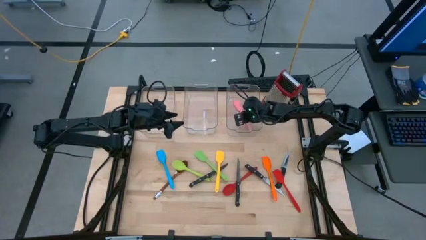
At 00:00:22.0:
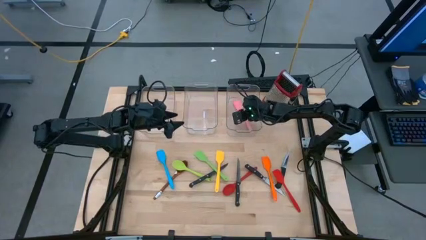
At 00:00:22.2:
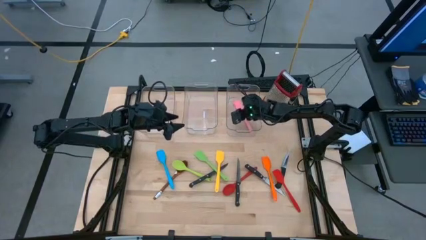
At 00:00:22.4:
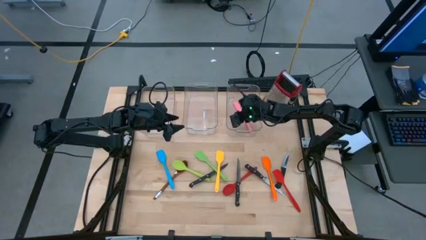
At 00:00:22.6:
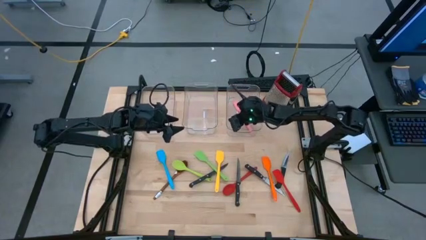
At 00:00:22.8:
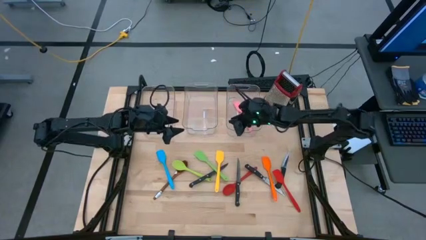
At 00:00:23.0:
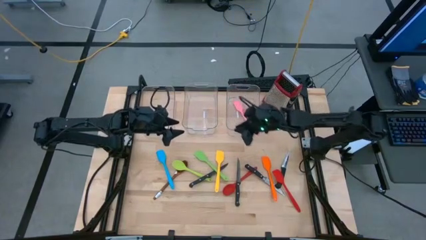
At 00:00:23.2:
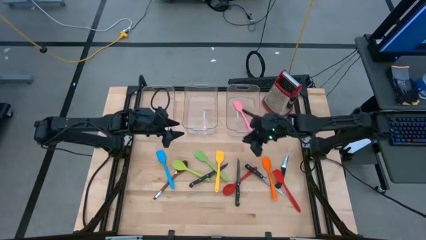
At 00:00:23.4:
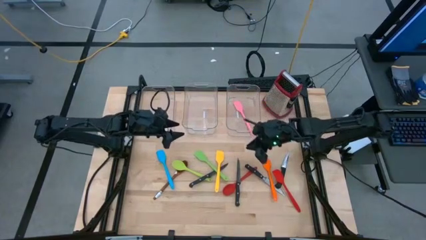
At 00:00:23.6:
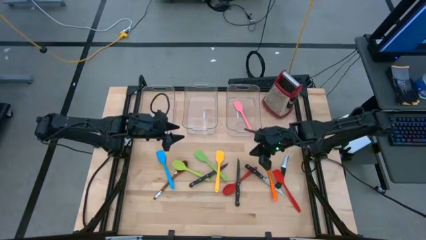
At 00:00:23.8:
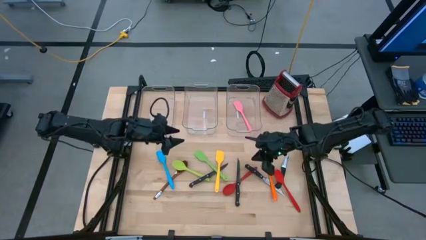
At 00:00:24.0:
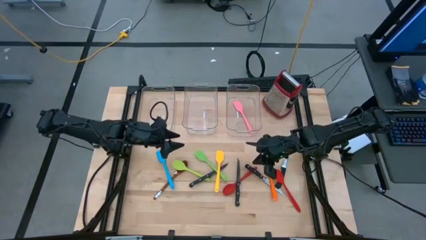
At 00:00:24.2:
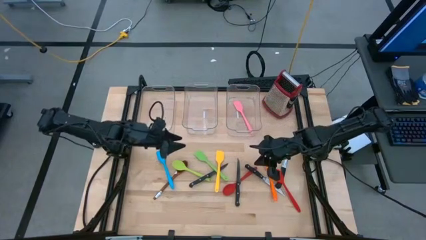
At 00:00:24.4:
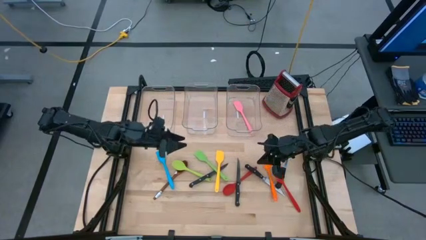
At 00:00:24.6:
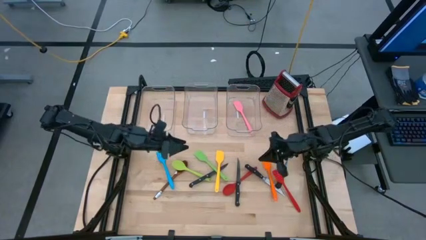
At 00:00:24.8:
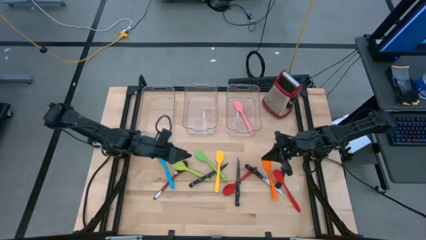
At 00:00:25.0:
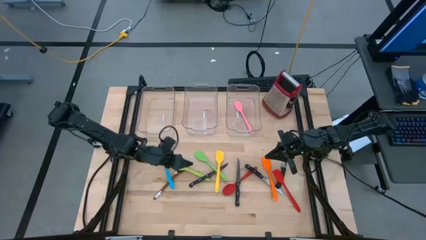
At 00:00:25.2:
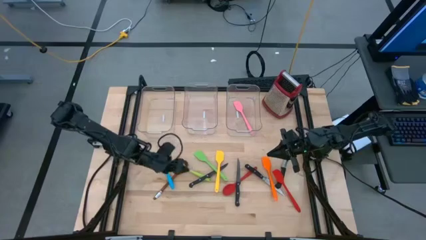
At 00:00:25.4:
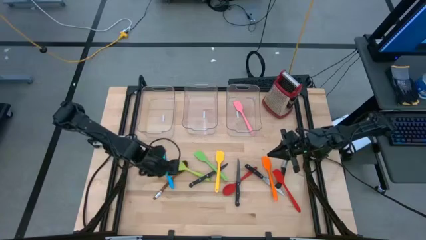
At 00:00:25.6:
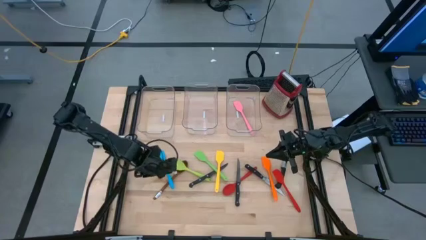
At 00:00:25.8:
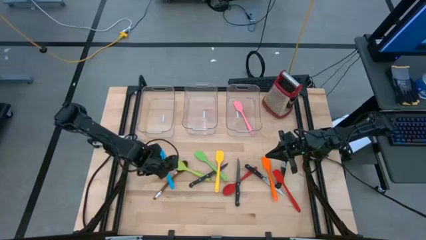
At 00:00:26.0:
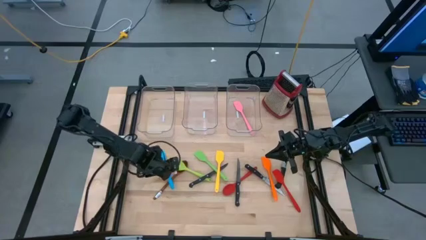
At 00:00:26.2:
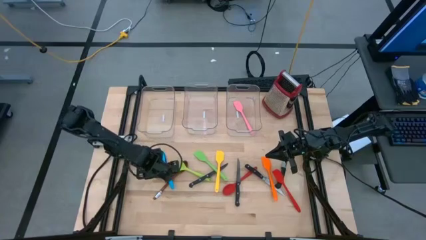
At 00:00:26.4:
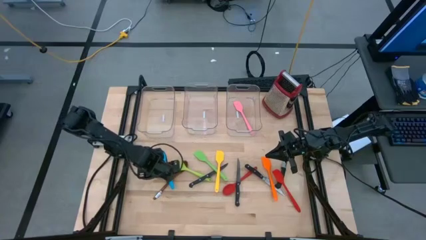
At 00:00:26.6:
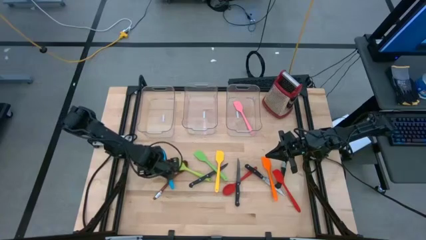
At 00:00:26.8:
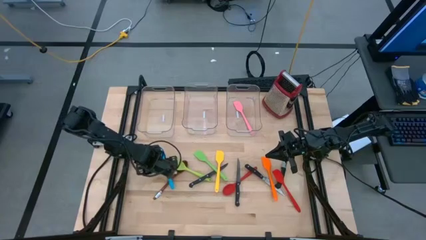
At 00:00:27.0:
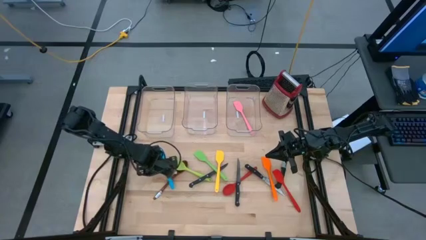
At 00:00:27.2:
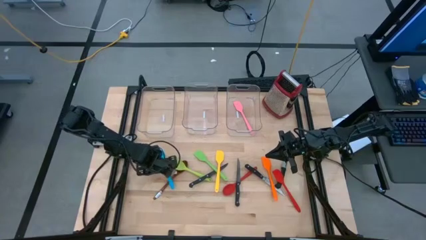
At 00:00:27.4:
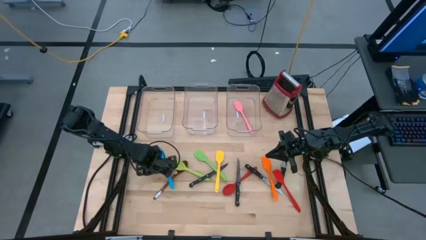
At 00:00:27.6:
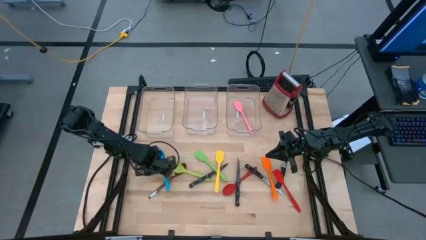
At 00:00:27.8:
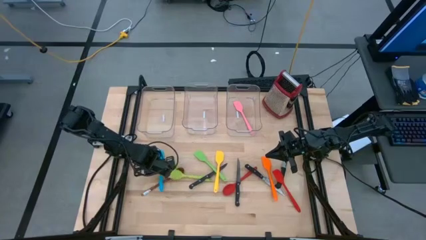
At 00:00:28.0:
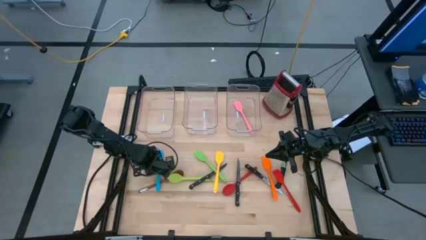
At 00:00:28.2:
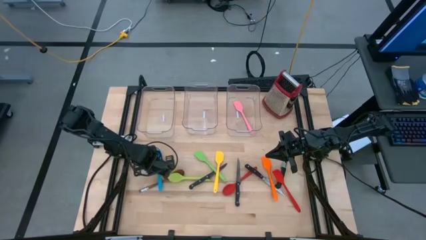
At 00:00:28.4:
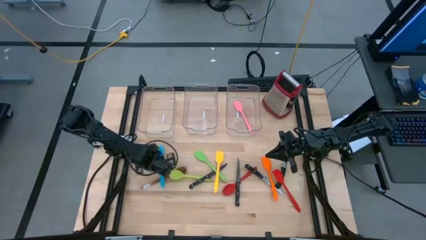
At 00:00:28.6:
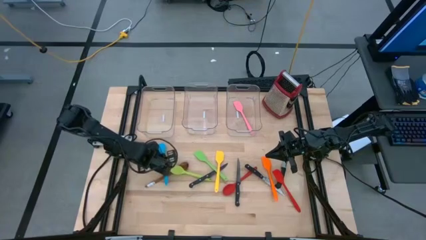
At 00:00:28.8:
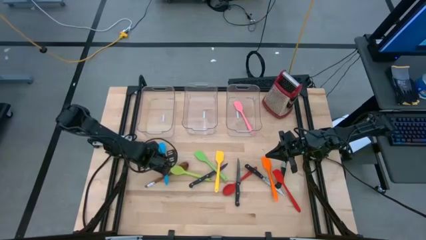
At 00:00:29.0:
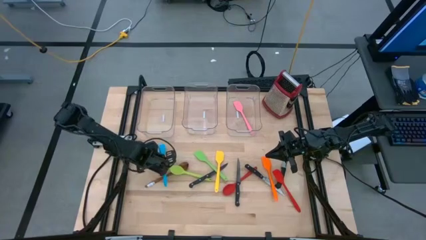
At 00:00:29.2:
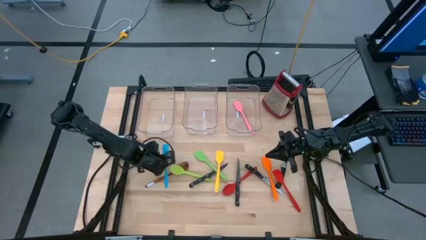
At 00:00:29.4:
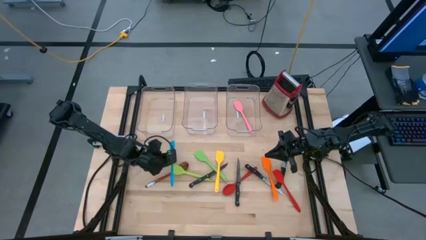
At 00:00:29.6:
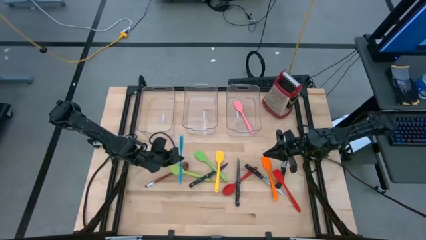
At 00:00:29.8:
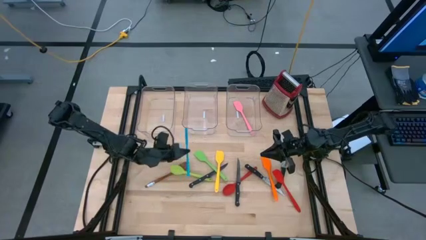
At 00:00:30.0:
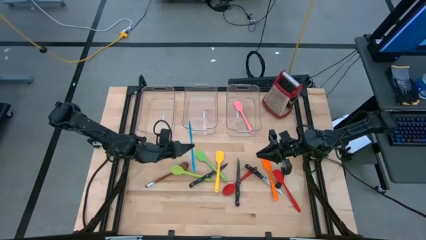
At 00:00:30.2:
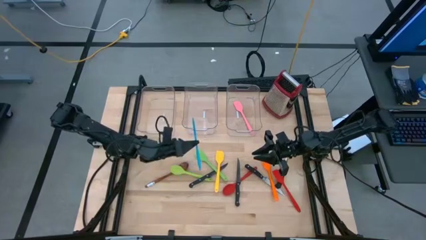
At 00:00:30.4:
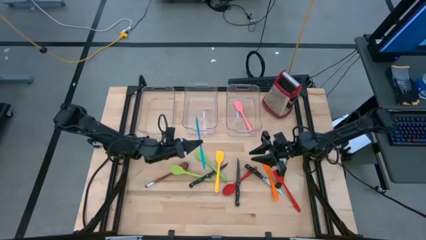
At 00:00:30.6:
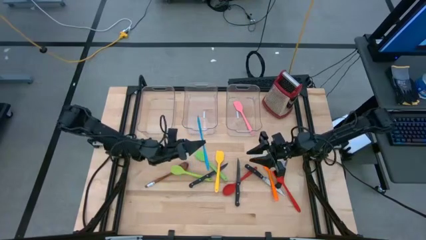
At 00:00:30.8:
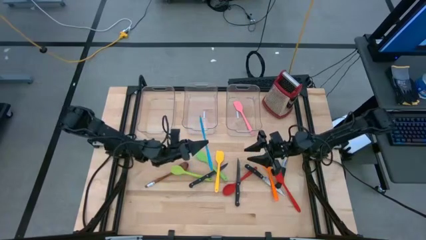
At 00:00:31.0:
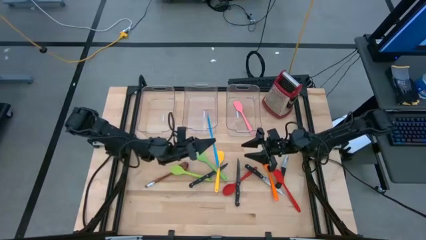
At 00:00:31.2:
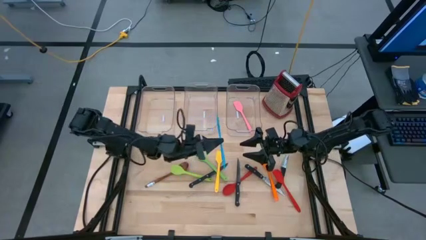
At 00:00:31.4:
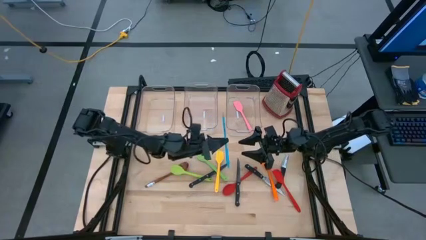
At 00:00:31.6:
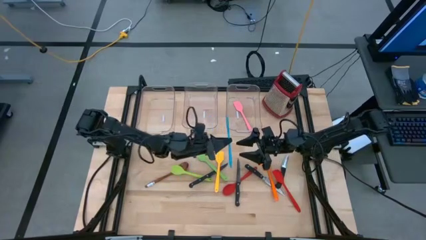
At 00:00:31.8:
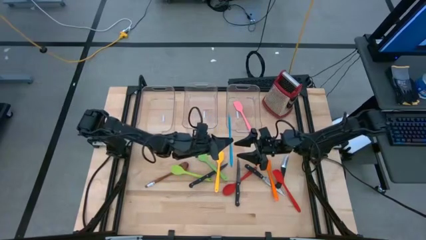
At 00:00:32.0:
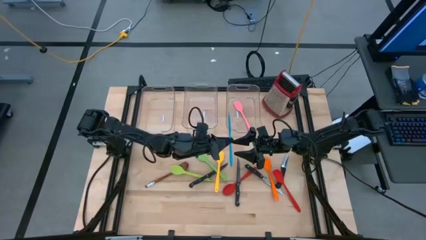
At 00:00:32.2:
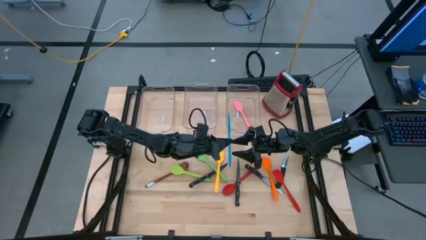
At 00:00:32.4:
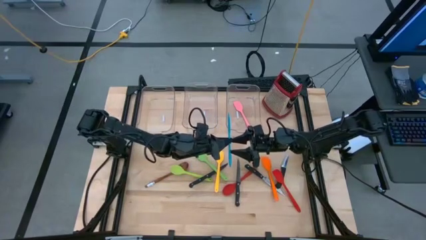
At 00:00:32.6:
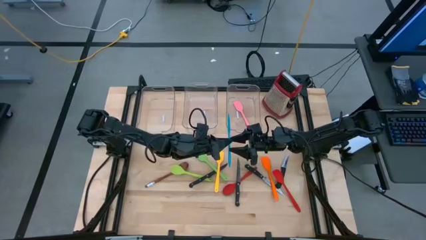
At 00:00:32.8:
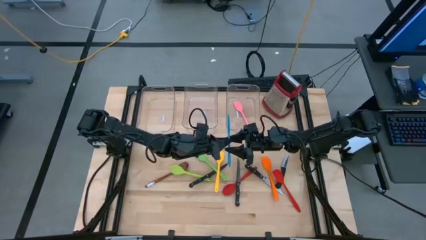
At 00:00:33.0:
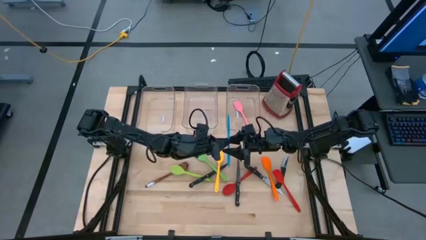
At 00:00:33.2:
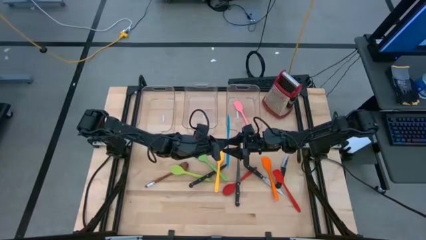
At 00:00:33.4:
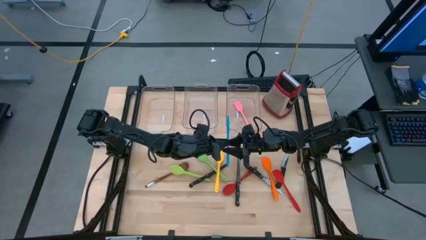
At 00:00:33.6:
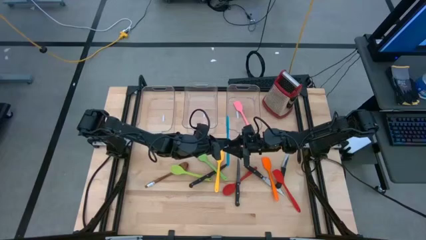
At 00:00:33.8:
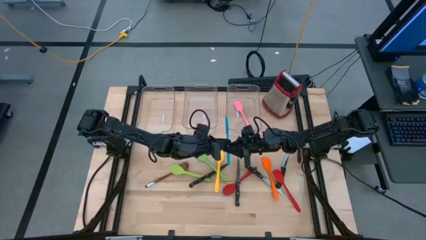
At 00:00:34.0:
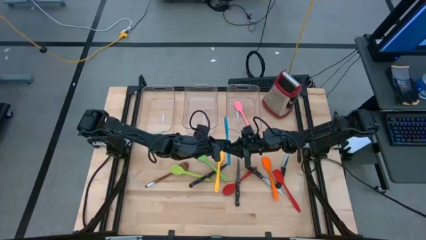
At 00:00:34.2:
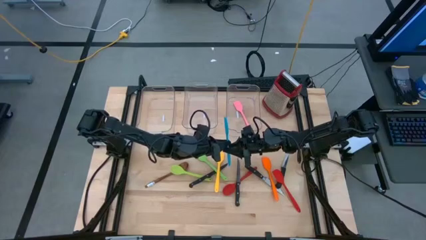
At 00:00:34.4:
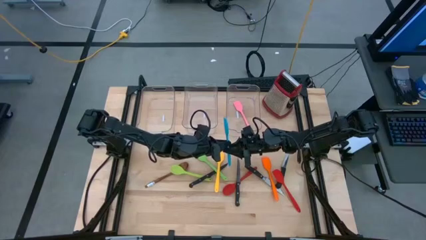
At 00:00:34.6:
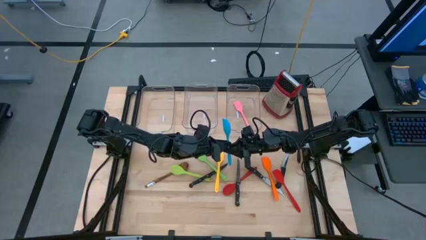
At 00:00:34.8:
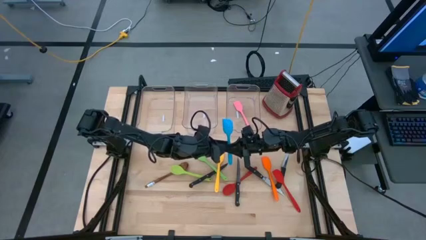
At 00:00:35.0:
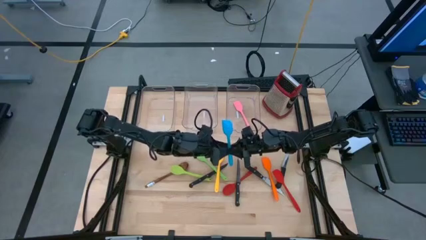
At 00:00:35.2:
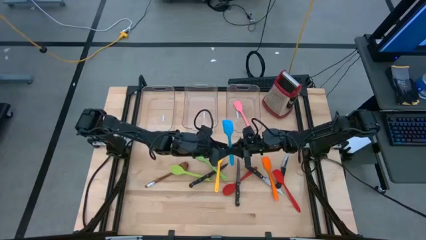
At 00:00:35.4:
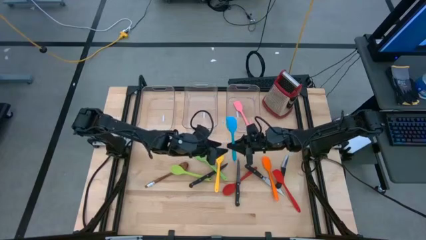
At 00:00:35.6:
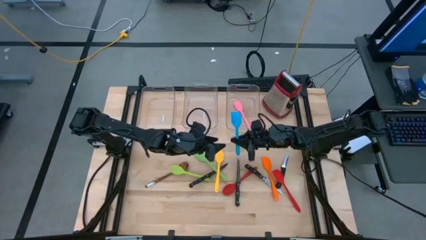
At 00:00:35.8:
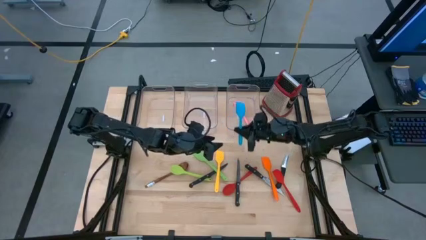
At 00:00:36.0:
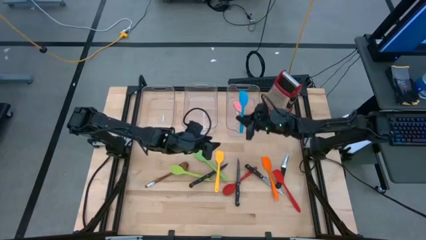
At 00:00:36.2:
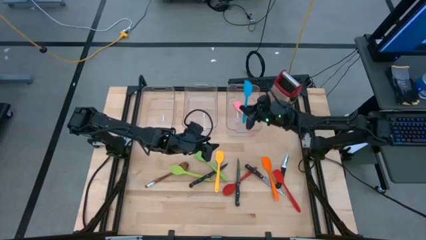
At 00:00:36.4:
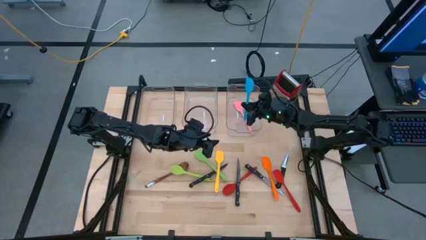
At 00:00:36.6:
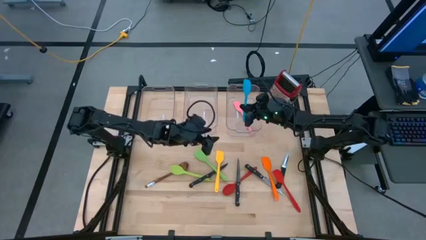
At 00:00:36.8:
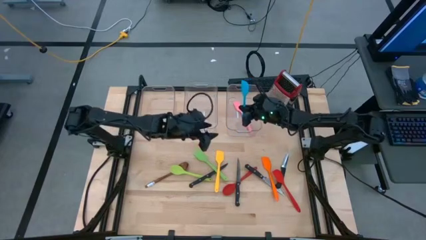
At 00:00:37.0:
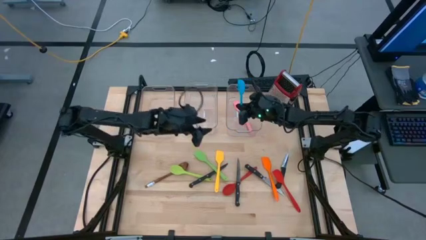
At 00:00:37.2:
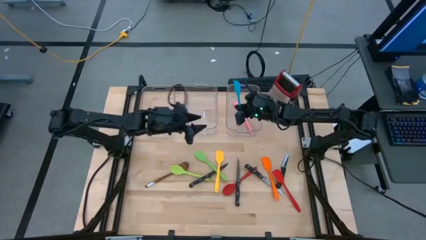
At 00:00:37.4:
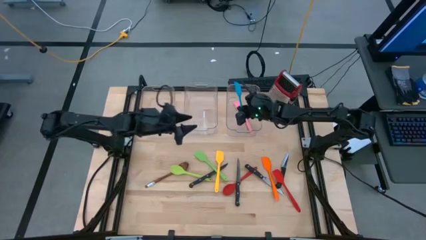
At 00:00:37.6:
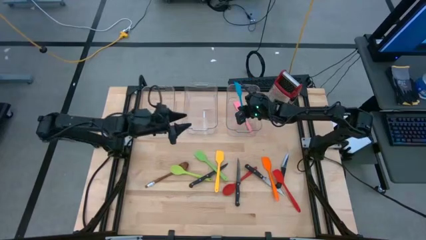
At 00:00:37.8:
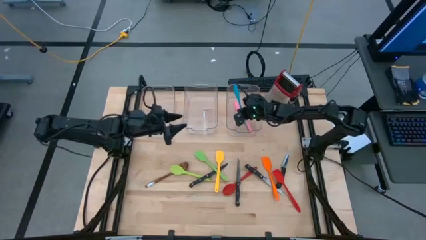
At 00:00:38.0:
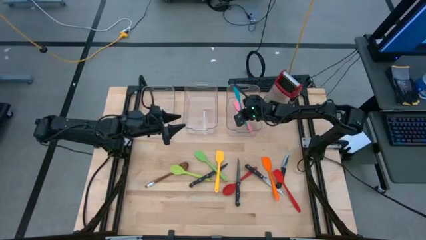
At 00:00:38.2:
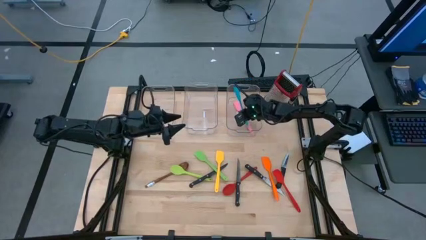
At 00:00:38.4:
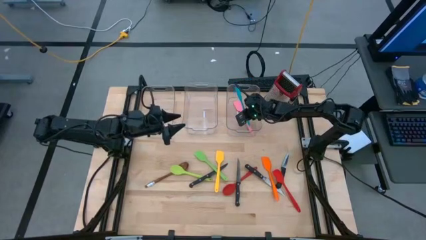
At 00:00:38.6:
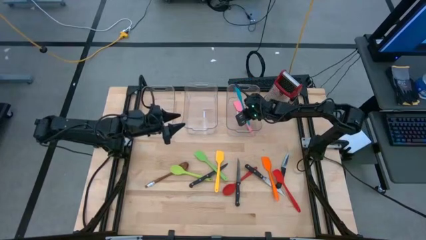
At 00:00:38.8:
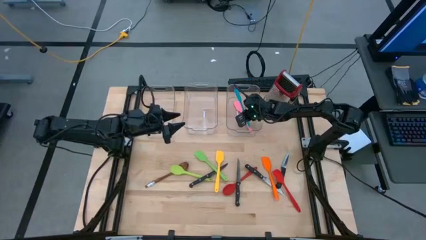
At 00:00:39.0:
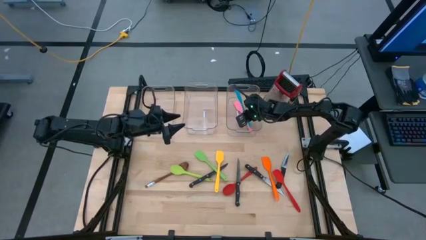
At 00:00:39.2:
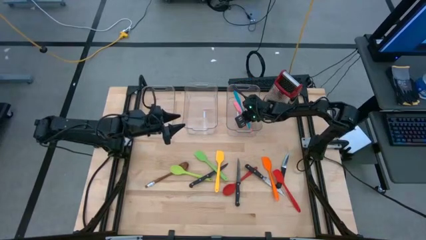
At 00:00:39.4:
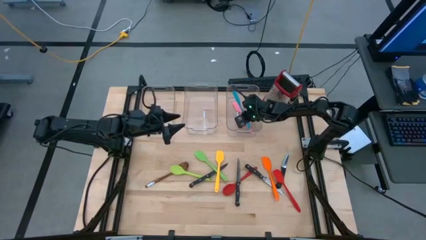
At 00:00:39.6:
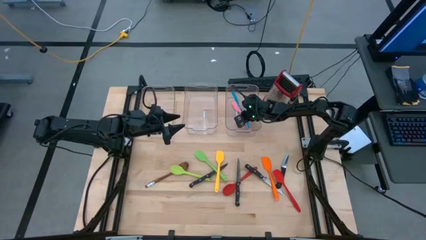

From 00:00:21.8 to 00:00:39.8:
Task: Pick & Place Kitchen Items
Put the blue spatula into the right transparent bin
